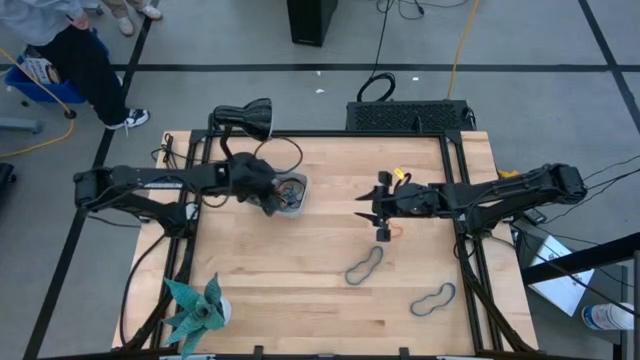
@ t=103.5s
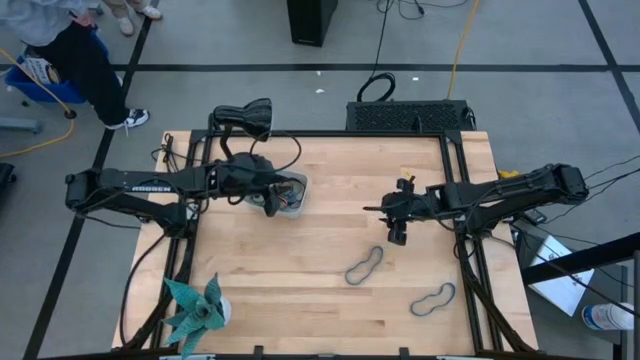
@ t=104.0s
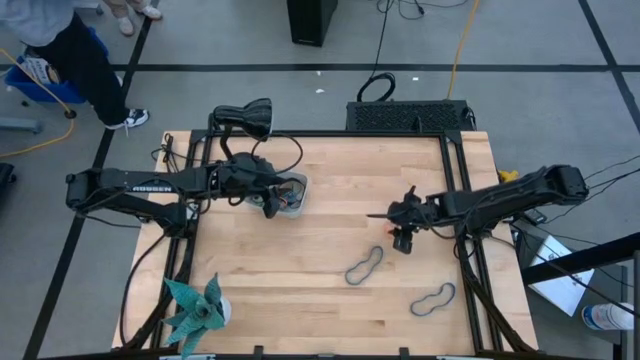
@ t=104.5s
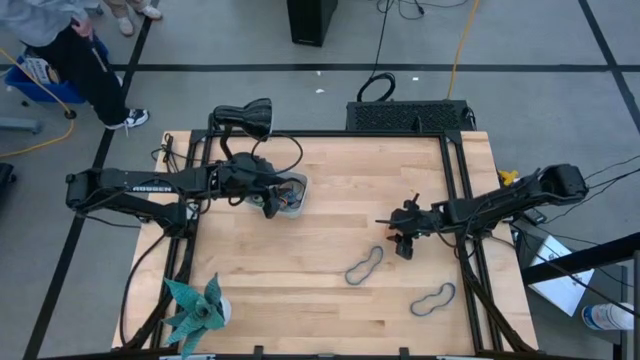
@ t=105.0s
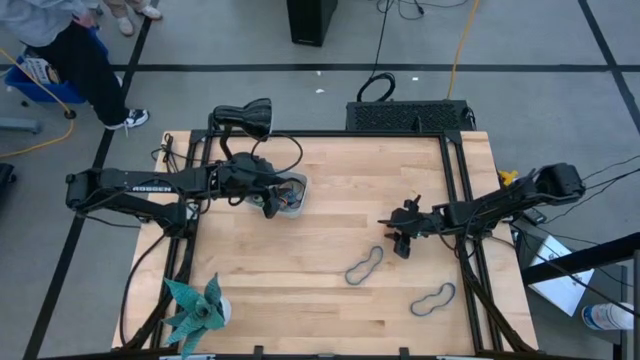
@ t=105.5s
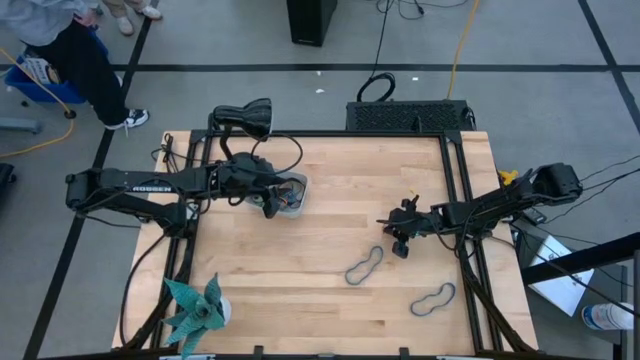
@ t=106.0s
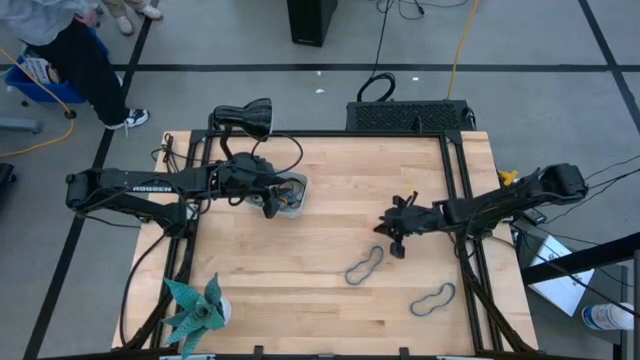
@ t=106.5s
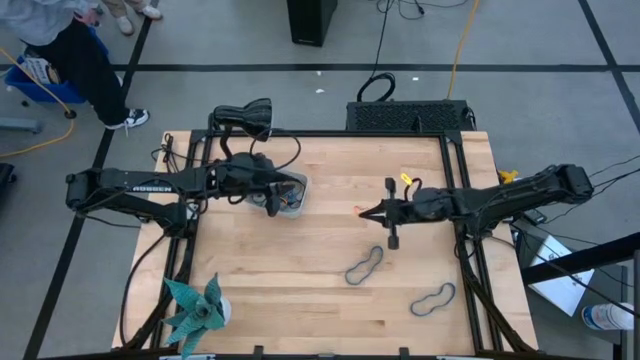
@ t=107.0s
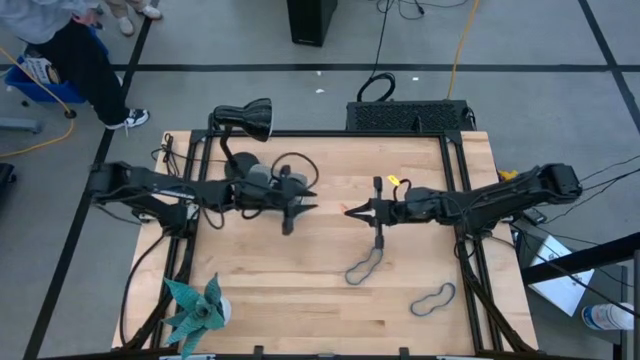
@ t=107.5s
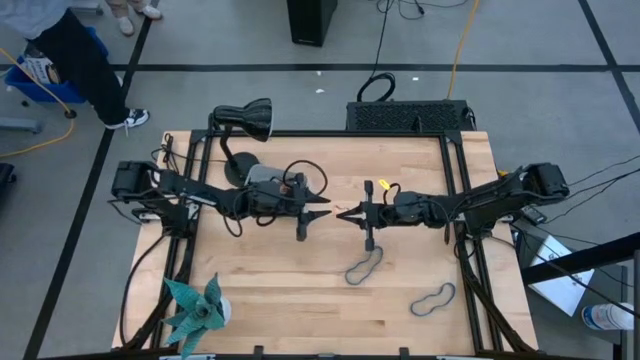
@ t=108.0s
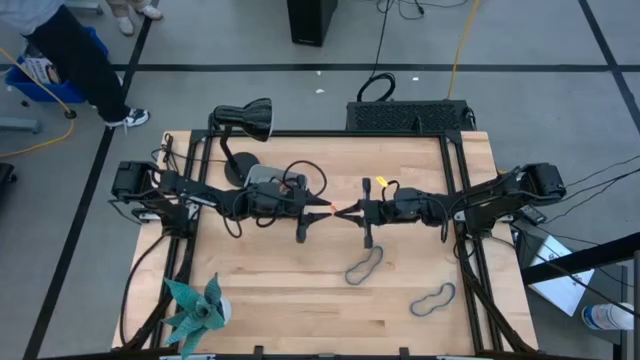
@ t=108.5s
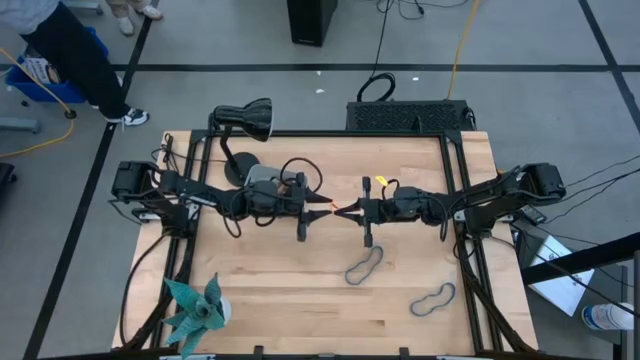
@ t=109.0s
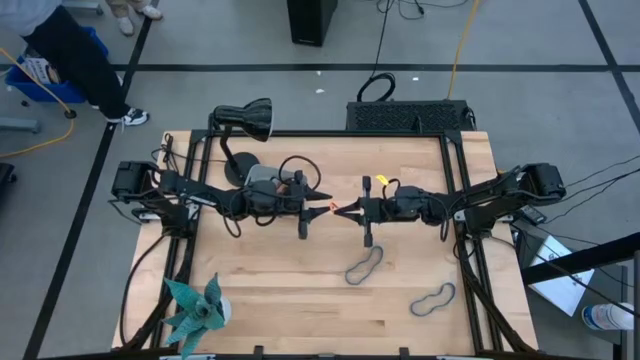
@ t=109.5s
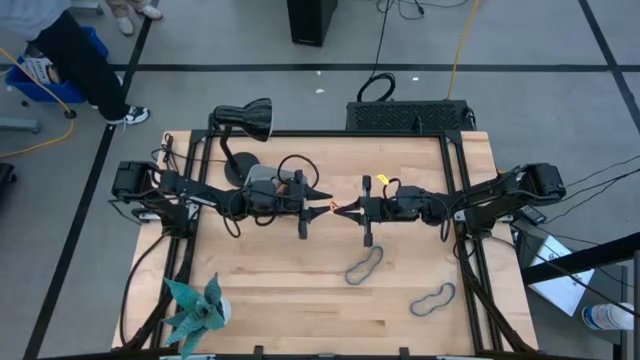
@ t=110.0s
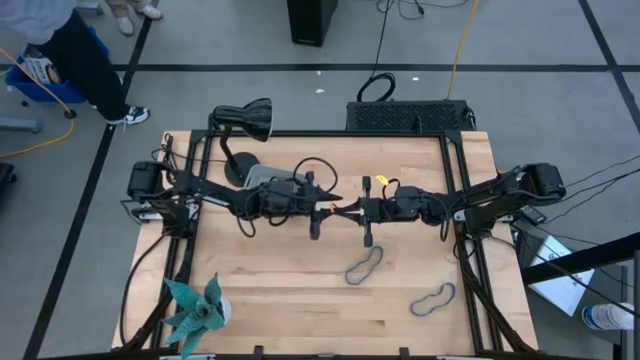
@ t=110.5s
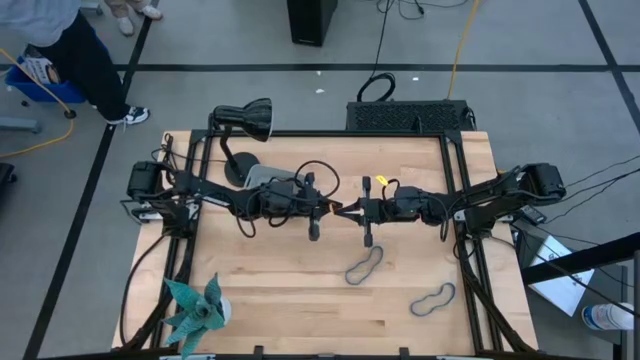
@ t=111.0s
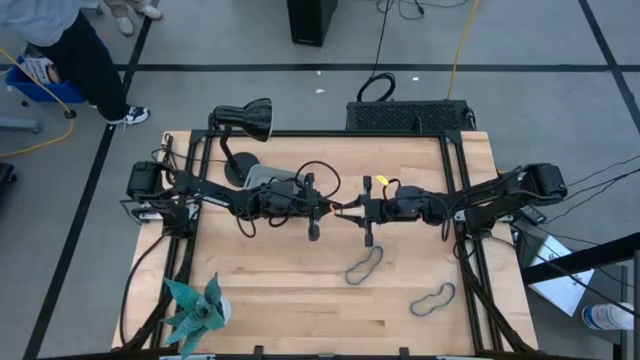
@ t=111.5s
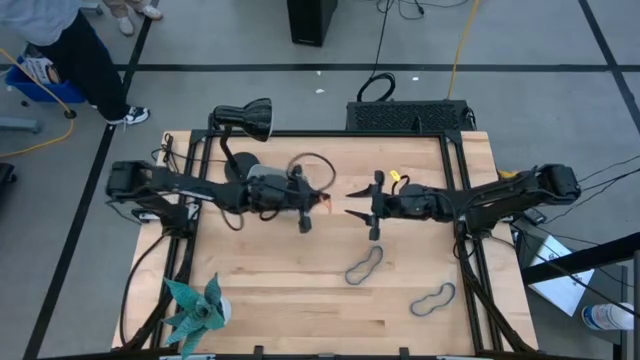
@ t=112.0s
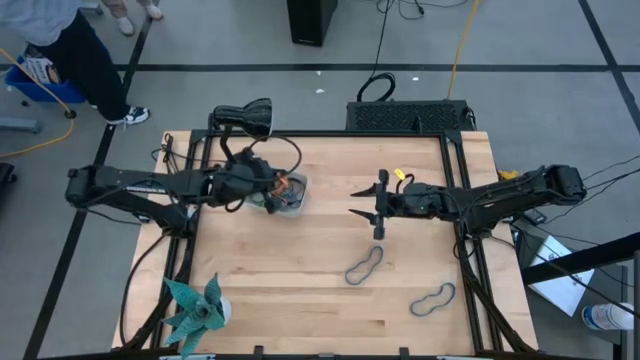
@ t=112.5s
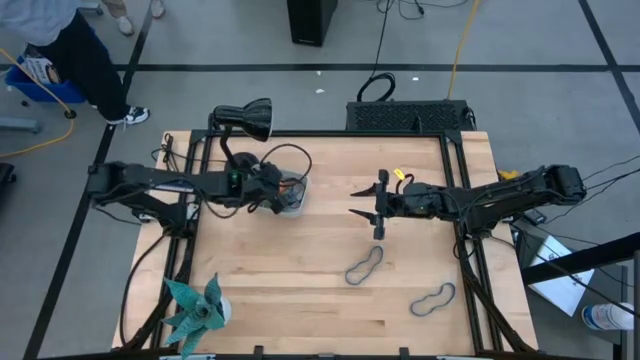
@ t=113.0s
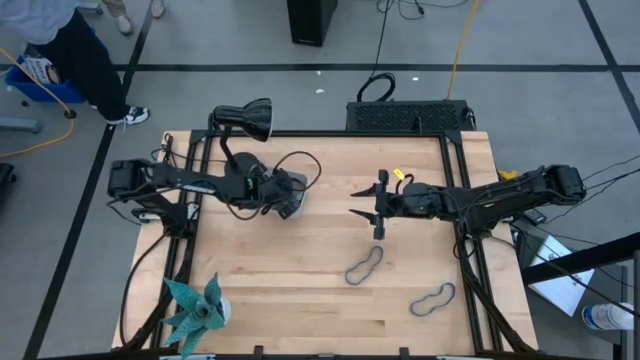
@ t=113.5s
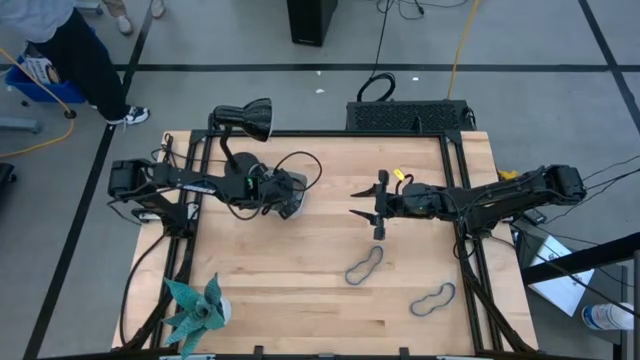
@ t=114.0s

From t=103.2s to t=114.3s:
Task: Pick and place rubber bands into bin
Put the orange rubber band into the gray bin

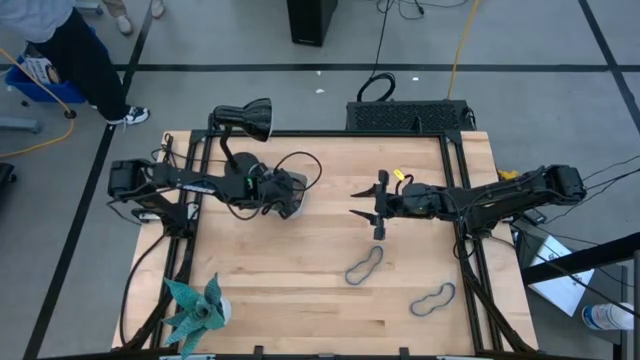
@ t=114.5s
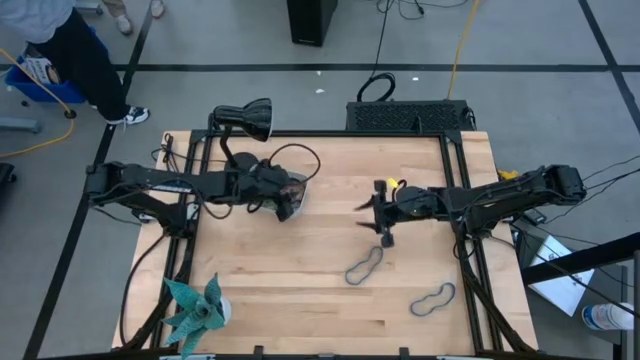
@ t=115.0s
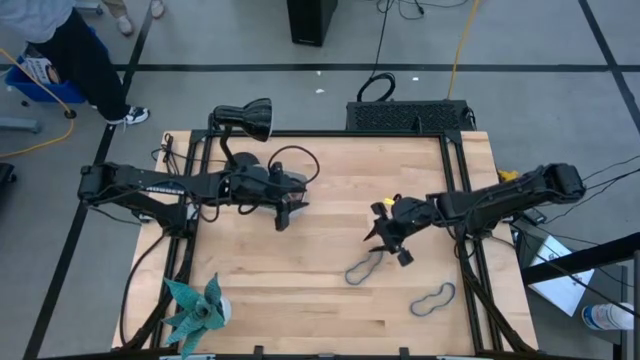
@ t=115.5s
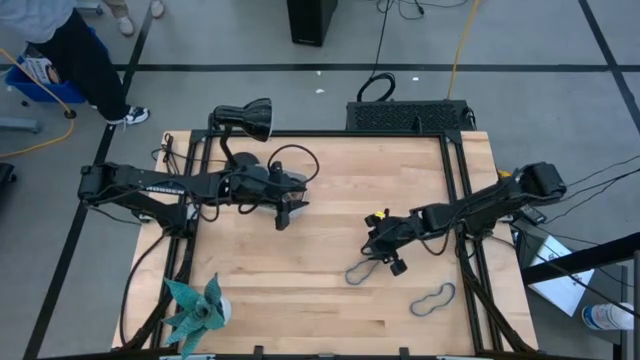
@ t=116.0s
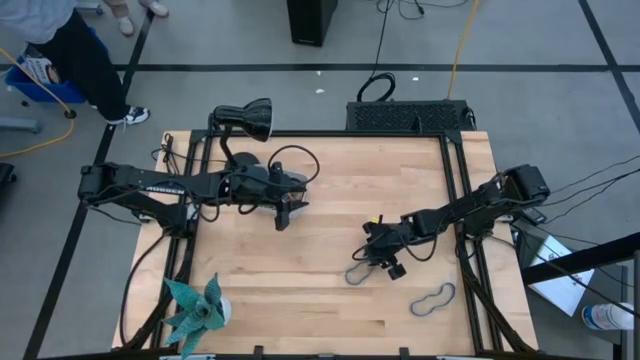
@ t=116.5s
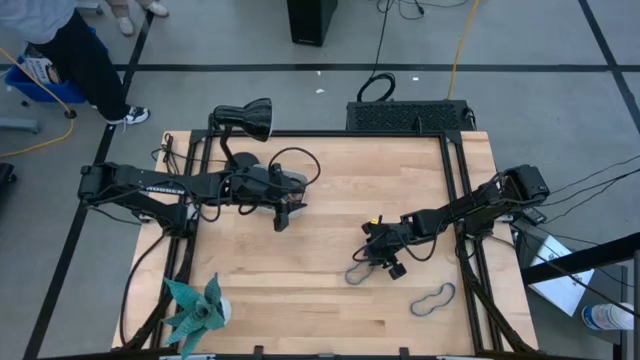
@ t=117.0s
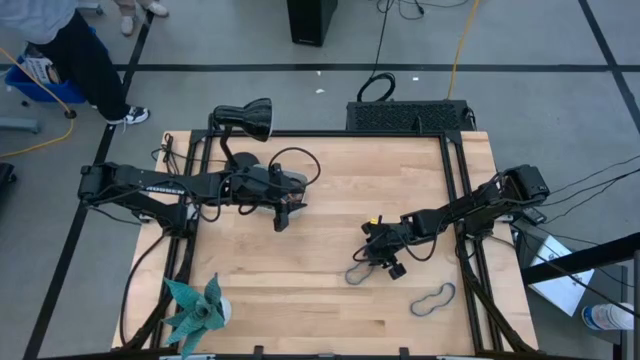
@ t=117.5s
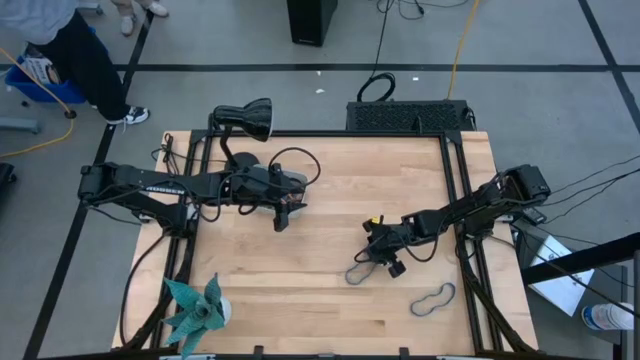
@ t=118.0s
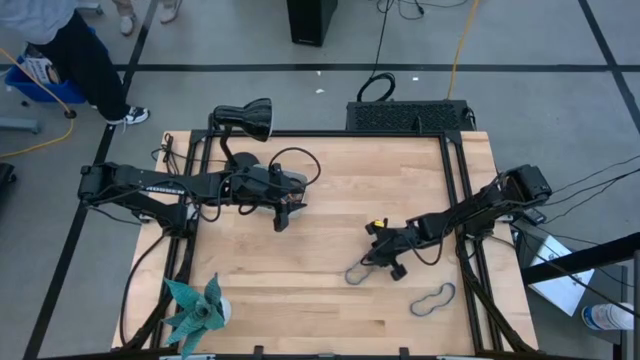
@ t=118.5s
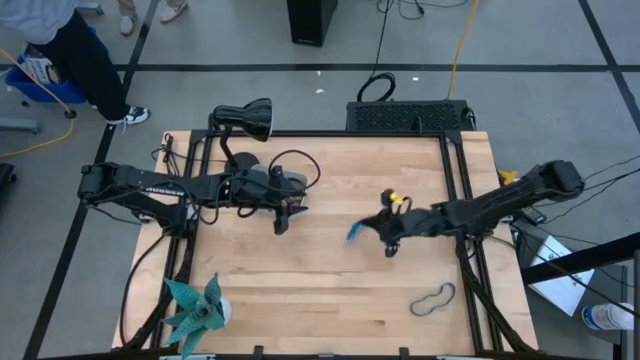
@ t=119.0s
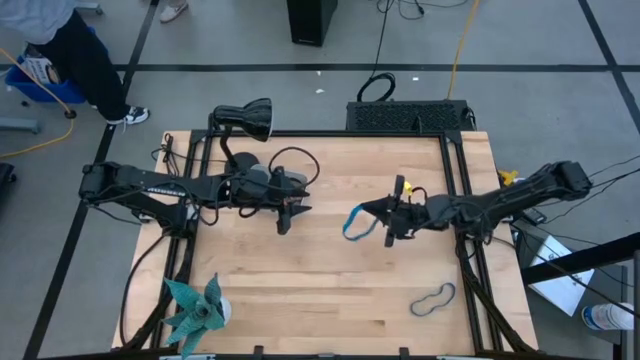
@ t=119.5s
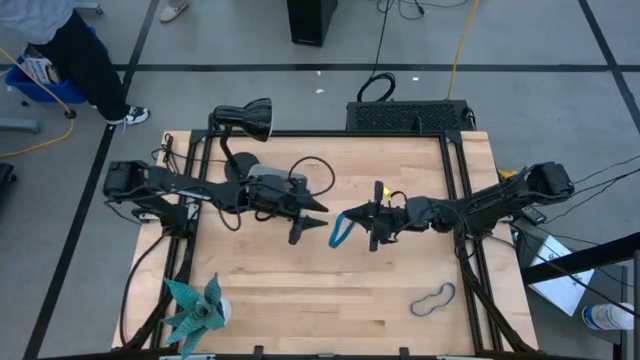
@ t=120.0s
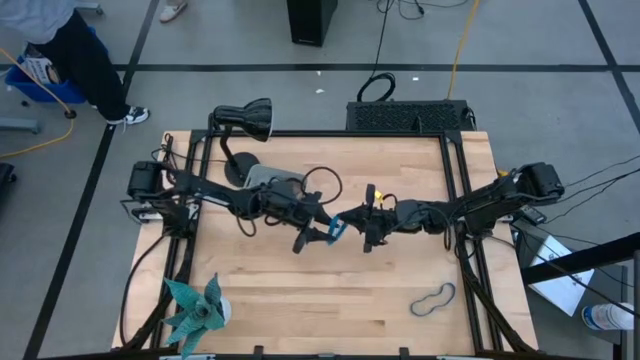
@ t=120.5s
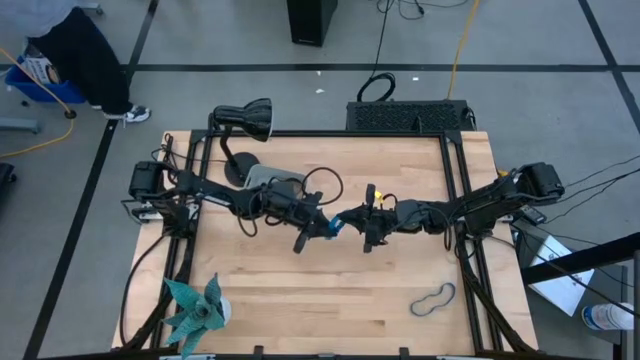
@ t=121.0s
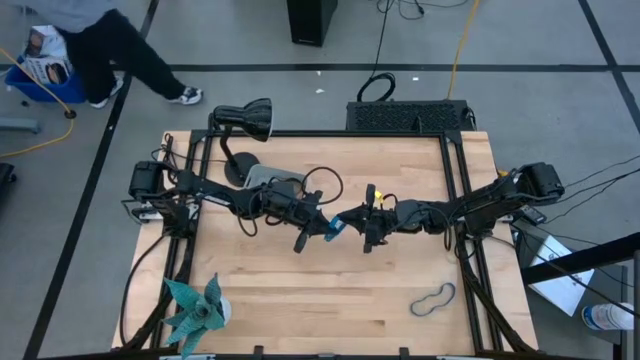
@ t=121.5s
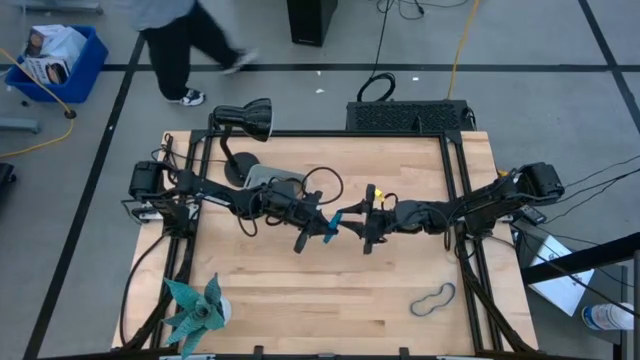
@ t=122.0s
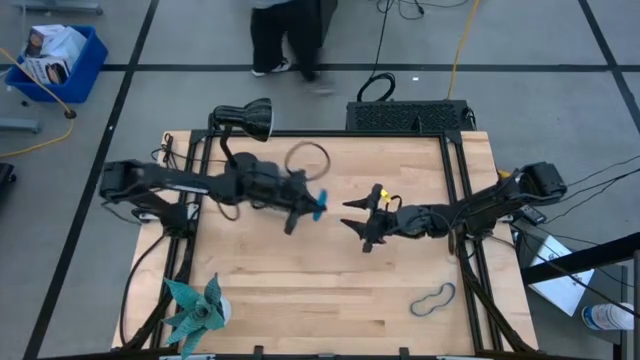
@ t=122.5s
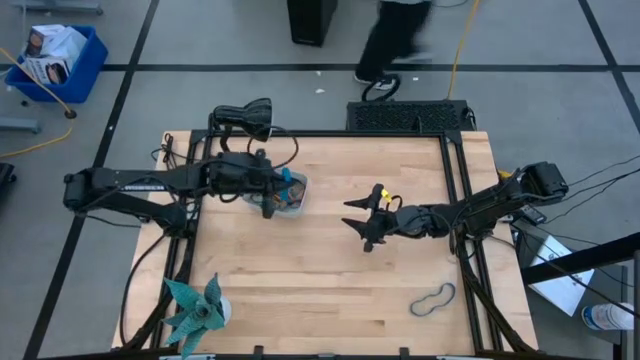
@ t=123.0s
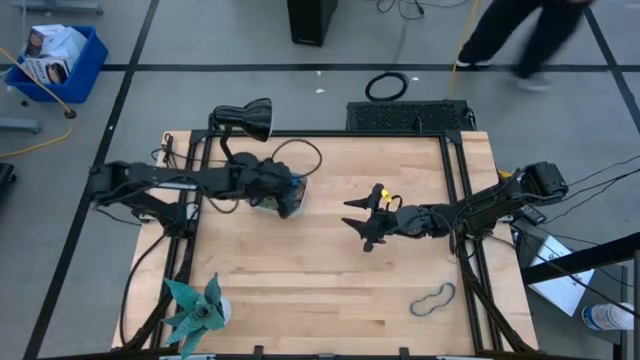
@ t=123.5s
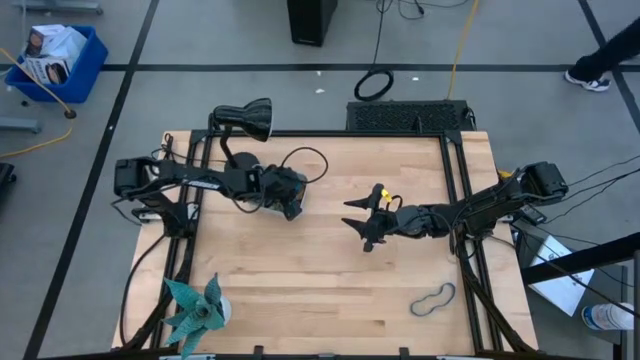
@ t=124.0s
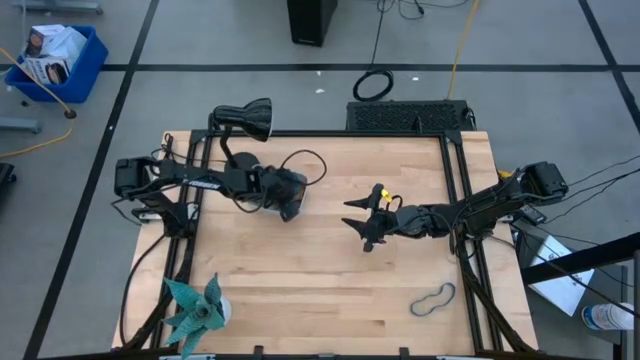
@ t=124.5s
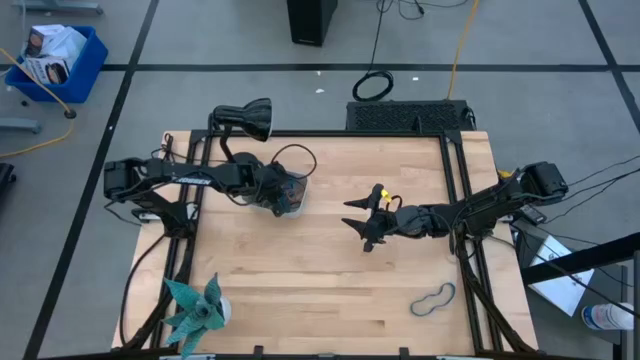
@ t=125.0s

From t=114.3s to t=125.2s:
Put the left blue rubber band into the gray bin
